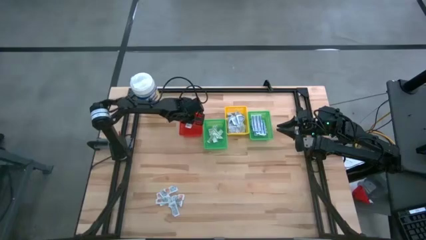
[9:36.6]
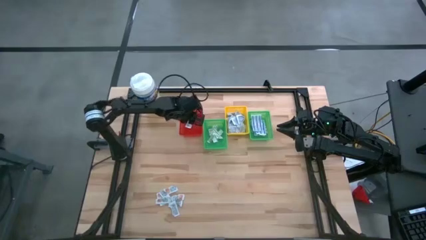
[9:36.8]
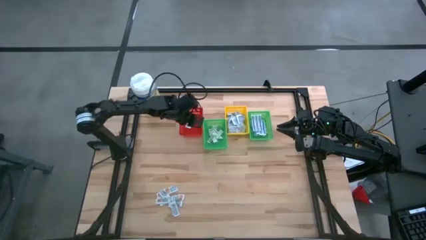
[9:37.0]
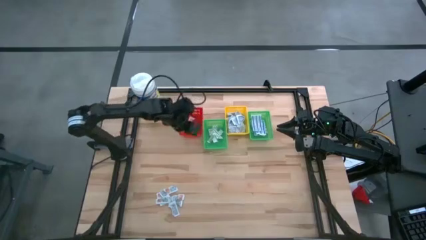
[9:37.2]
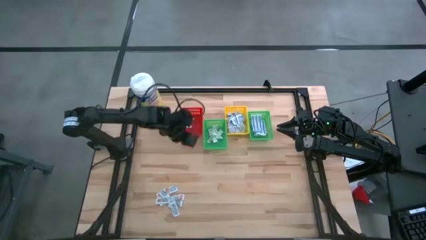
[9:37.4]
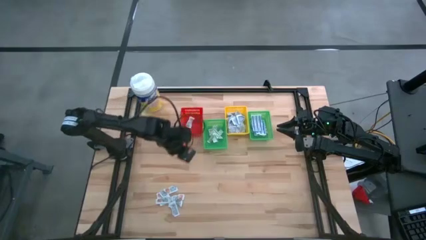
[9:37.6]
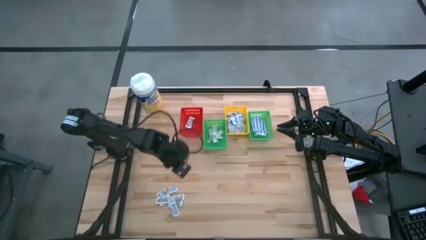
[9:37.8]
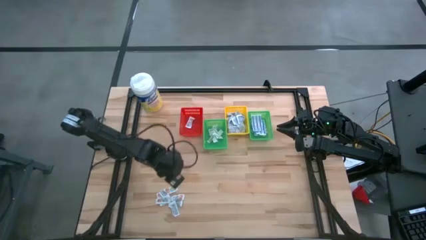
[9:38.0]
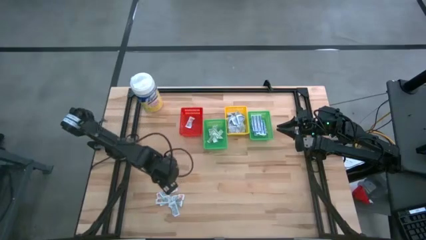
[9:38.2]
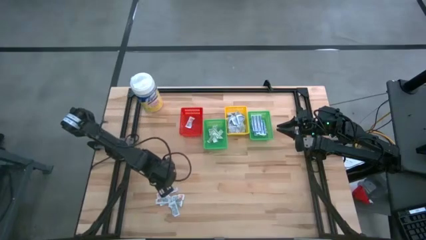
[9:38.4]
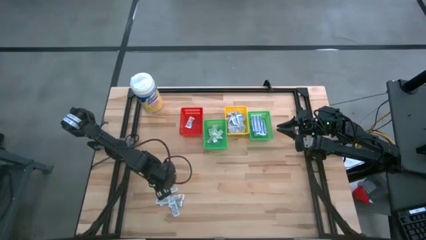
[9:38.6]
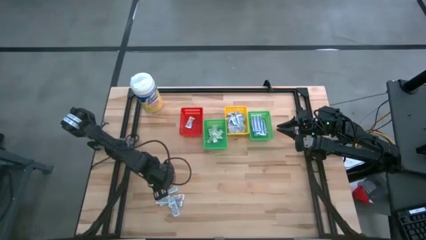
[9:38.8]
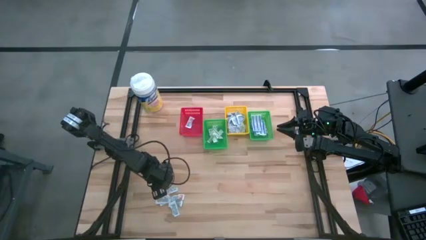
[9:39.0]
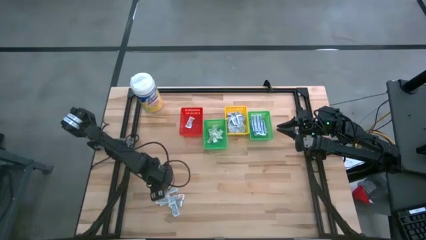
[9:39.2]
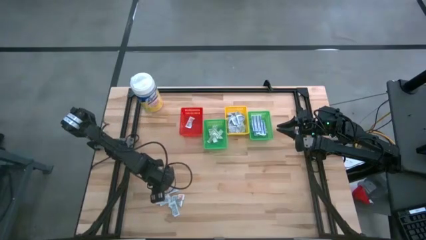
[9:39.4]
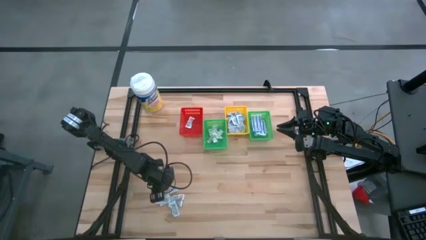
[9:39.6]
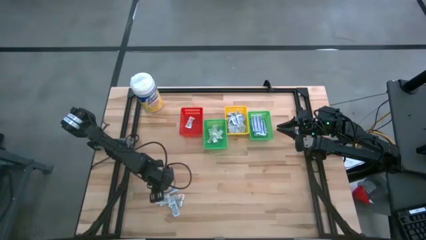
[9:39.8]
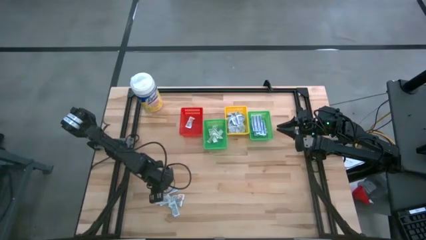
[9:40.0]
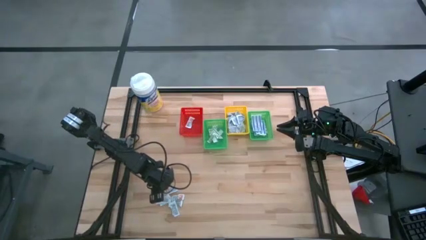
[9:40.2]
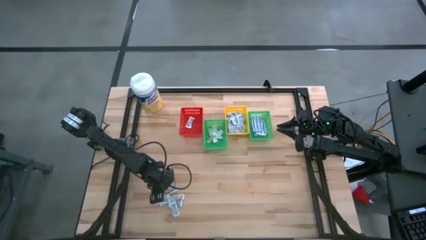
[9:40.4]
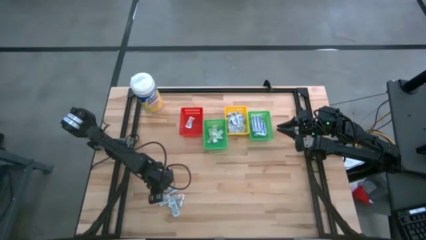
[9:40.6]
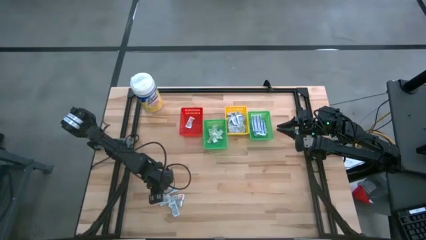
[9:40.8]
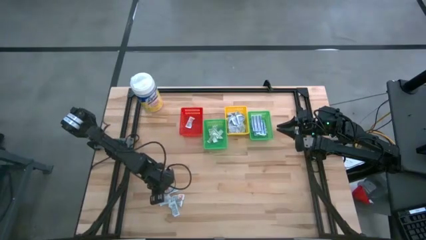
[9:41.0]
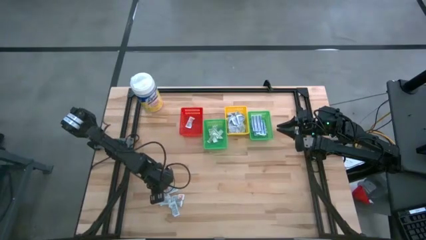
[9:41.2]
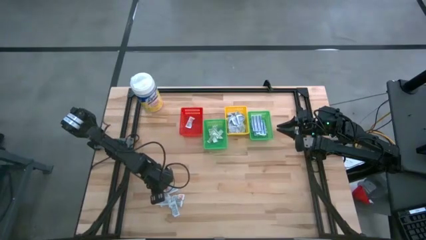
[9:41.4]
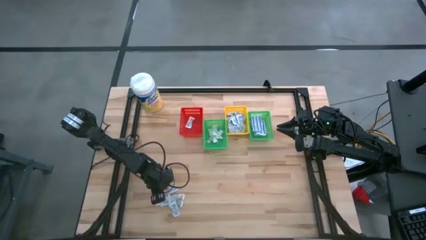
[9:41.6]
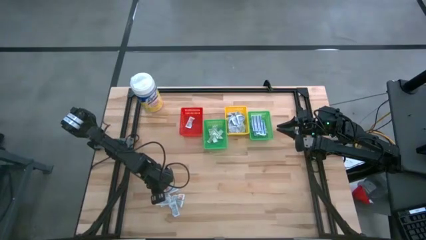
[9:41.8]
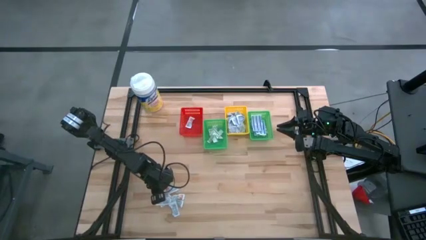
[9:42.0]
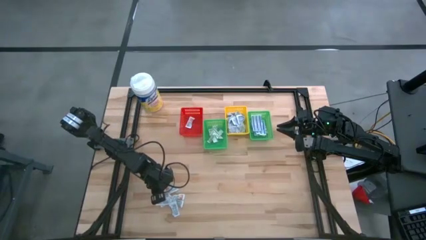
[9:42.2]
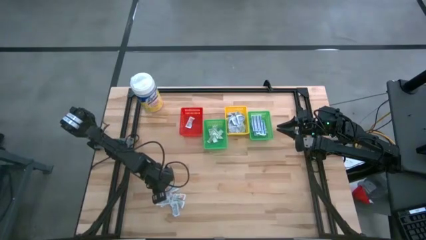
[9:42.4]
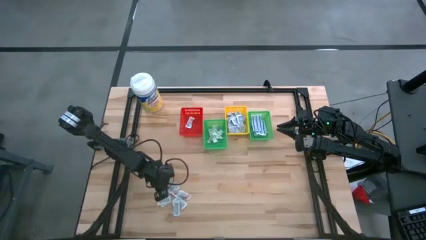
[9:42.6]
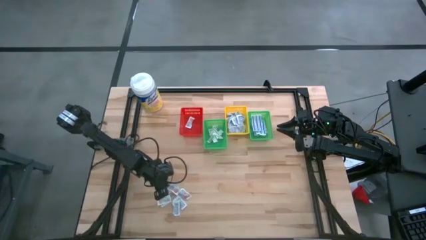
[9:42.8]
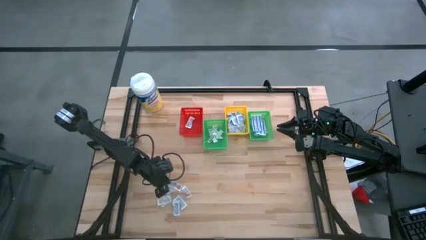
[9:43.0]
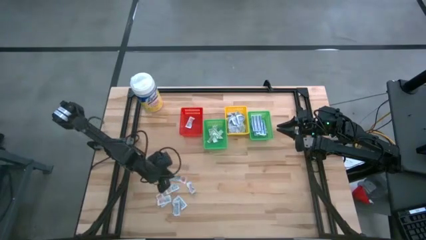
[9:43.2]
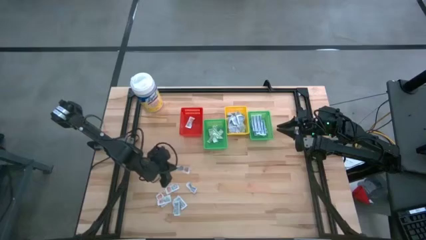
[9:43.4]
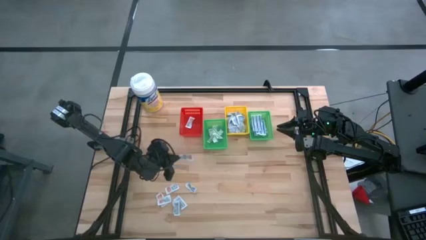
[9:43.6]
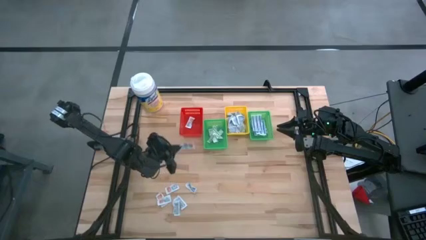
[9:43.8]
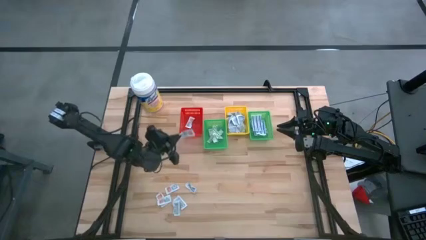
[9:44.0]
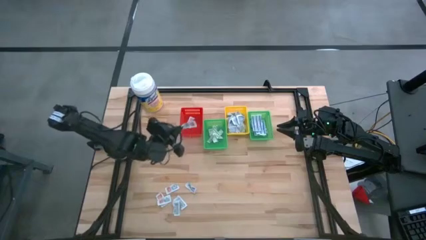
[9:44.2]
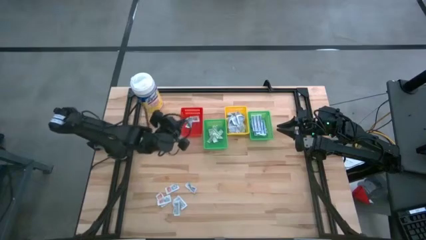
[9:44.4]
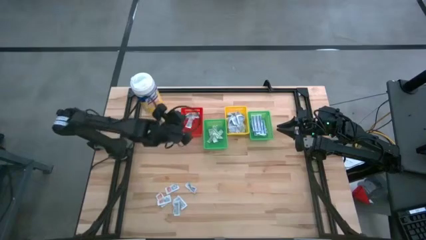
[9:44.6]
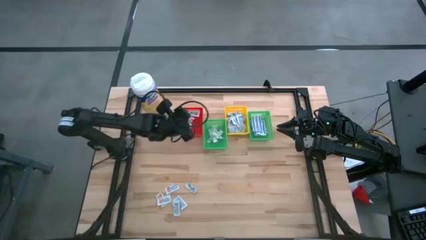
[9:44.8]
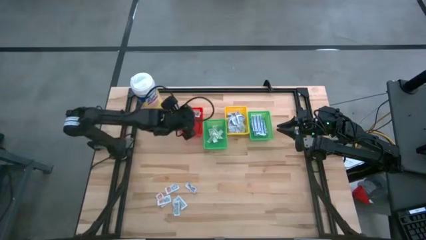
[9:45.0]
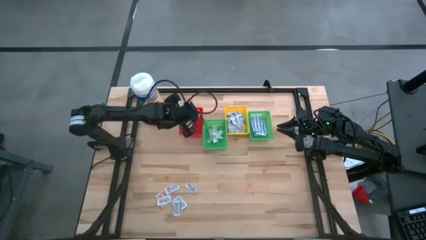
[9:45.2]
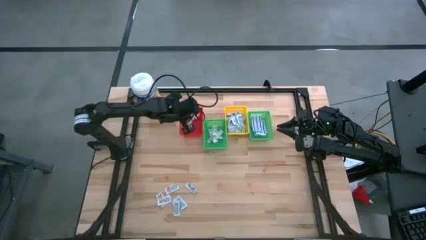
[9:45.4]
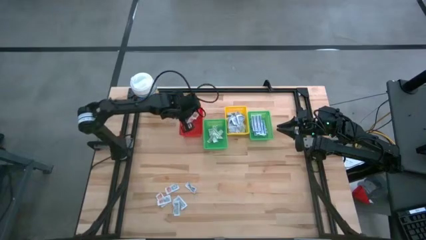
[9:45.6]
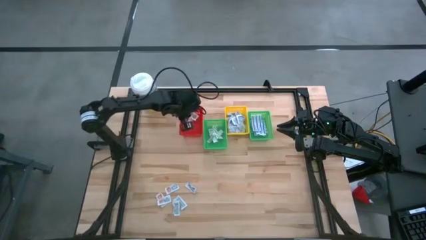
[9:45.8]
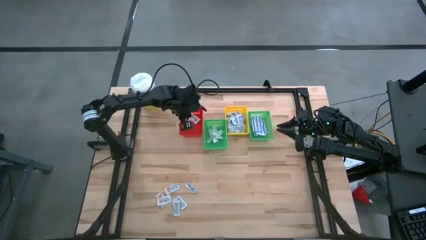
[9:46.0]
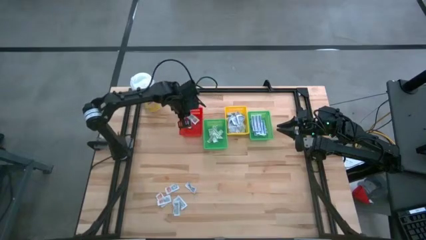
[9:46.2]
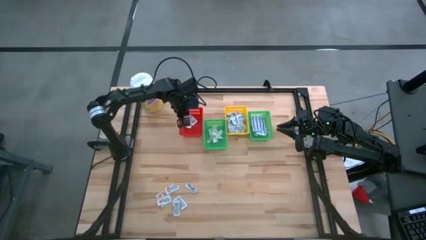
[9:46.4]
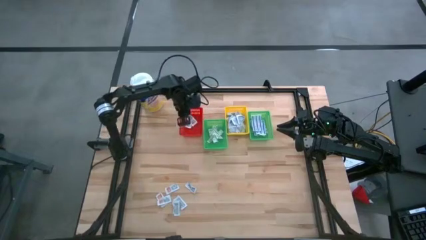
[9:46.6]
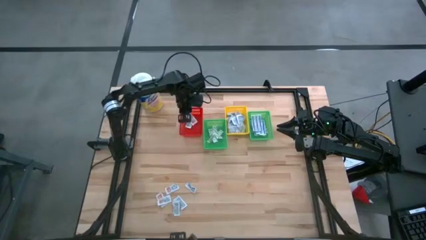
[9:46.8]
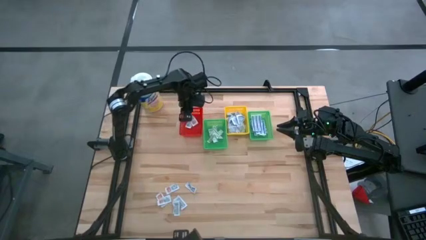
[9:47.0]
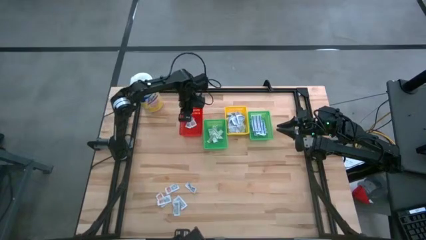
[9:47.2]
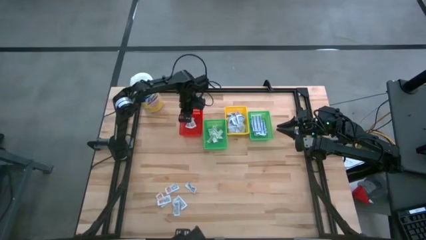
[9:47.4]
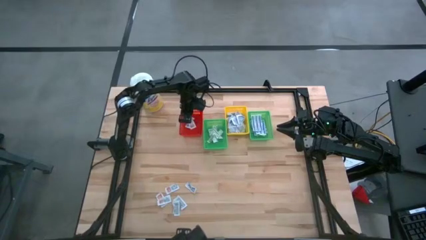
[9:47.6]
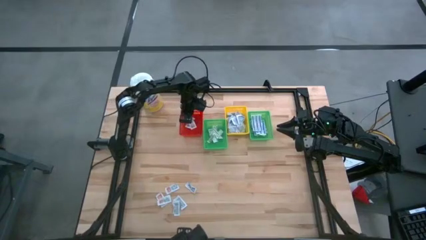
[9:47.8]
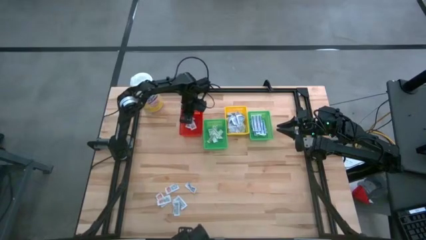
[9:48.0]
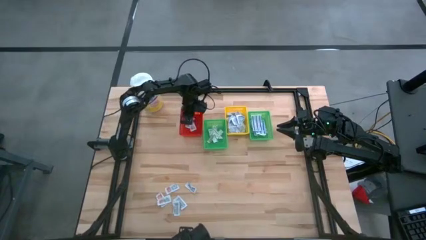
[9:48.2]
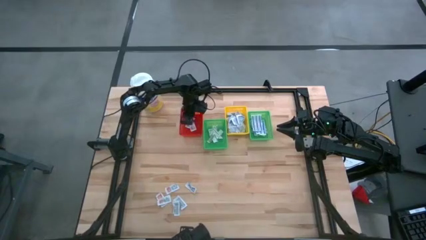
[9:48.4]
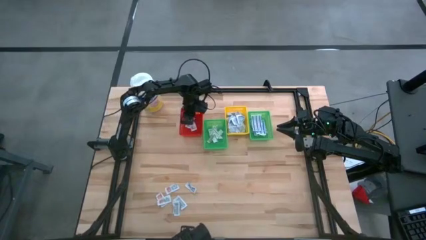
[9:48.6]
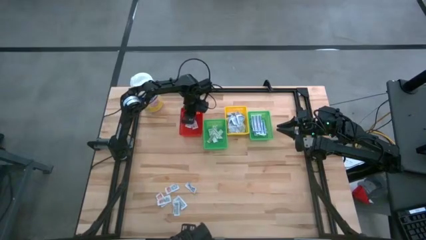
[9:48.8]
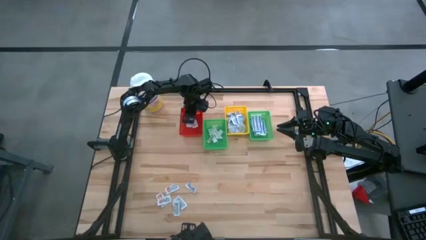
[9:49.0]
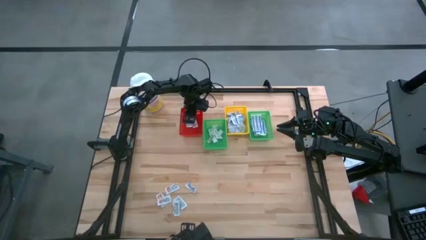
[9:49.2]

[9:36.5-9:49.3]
Task: Pick & Place First Aid Supplies
Put the ointment pack into the red basket

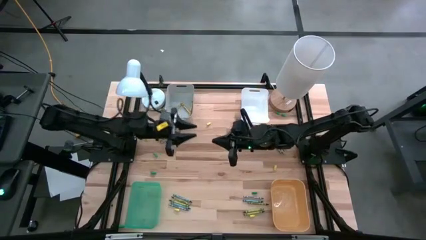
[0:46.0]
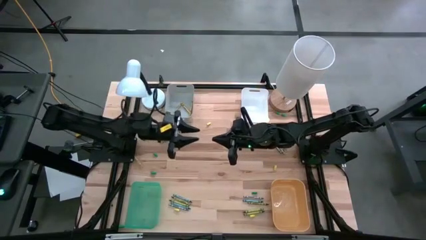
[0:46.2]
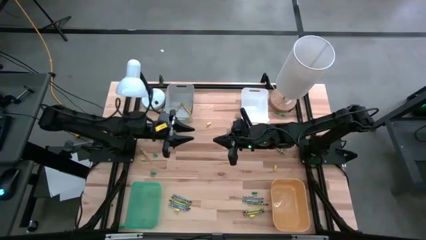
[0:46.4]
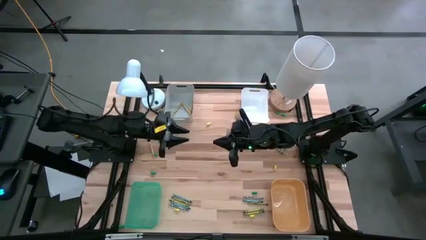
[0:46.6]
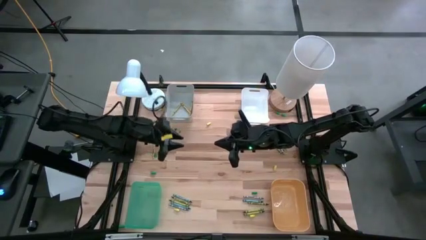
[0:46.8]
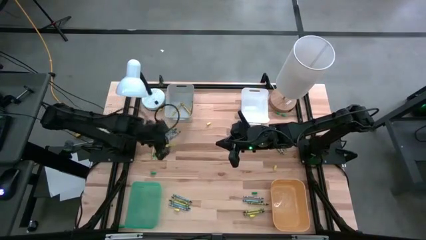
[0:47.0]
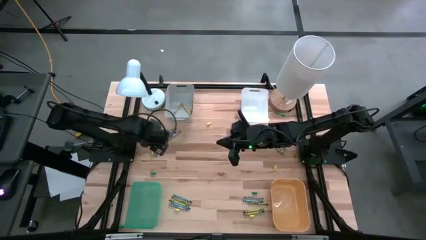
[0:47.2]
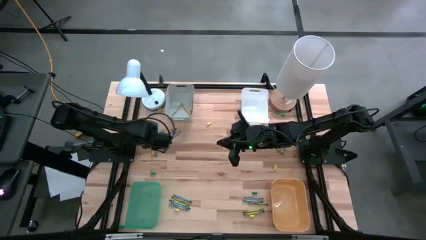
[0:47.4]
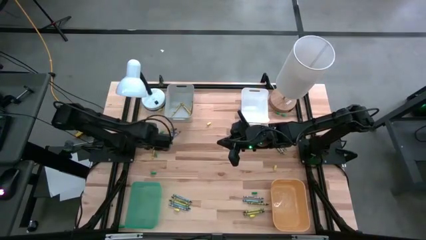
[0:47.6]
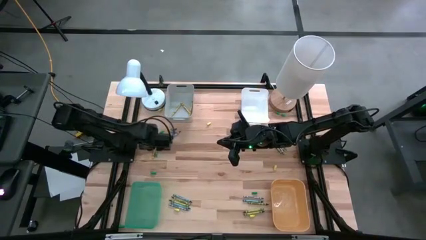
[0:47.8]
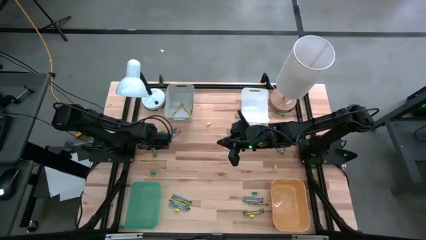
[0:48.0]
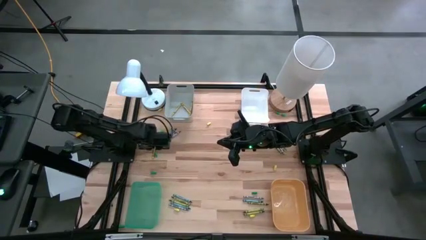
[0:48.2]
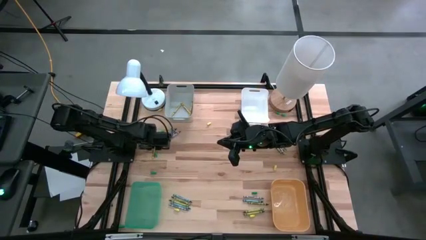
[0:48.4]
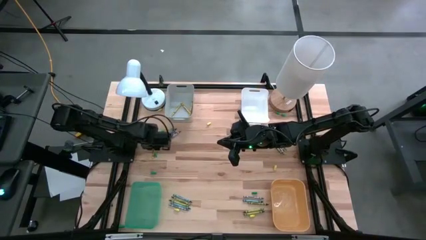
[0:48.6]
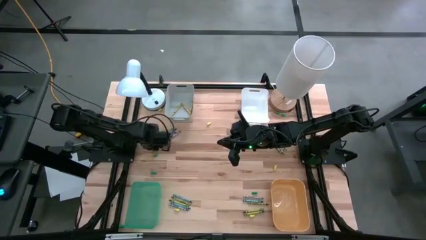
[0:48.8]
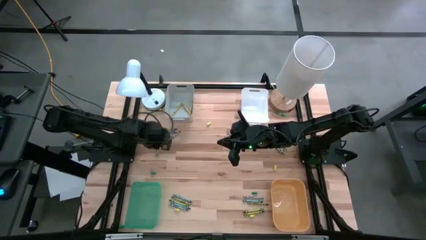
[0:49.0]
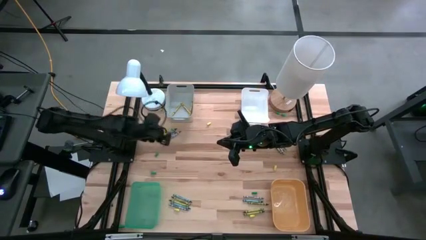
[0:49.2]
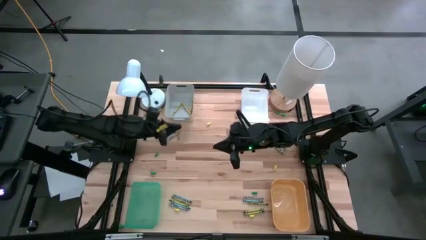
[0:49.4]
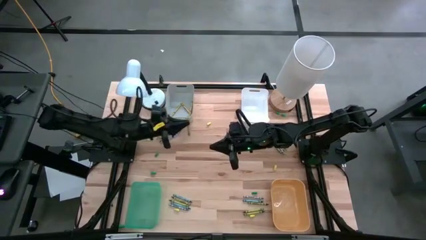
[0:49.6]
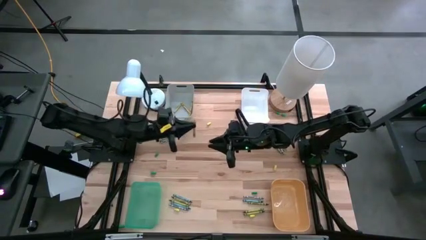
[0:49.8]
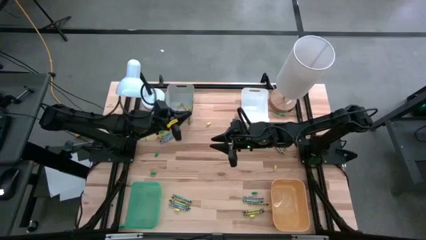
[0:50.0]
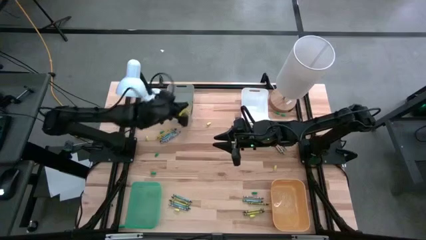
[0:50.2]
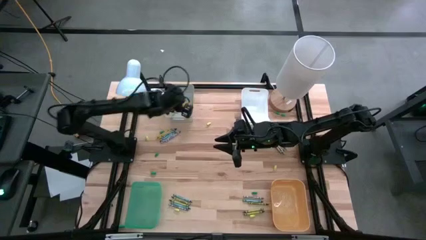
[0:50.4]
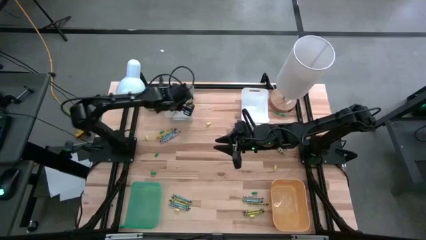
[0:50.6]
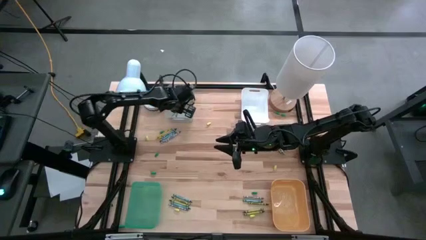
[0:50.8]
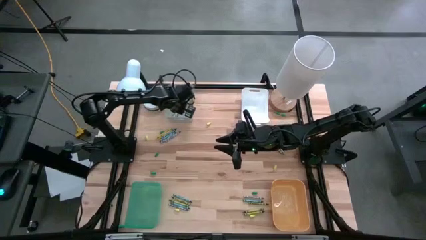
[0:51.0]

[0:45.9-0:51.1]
Task: Sort crayons
Put the yellow crayon into the gray bin
